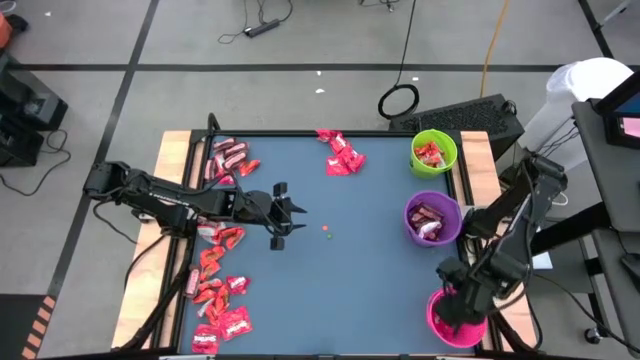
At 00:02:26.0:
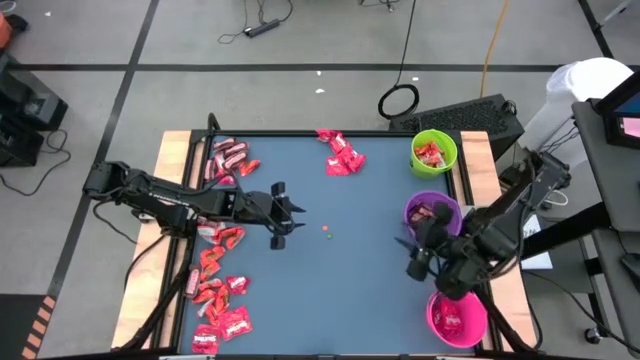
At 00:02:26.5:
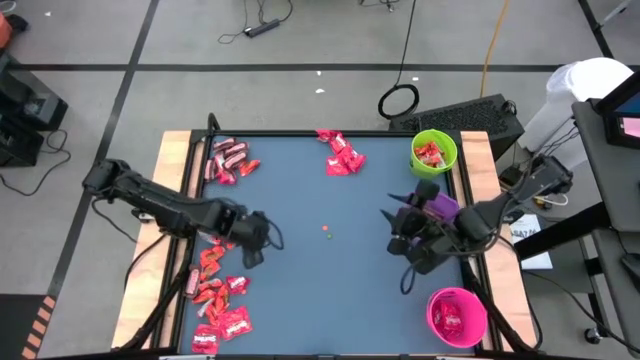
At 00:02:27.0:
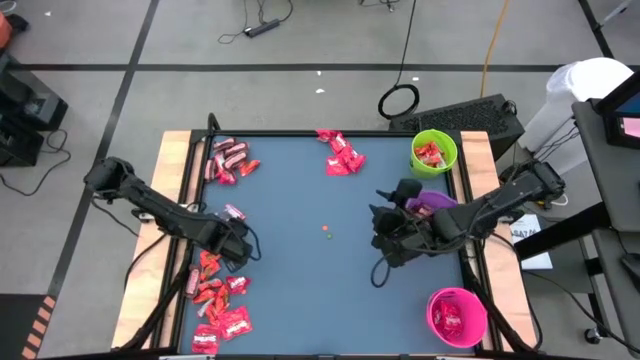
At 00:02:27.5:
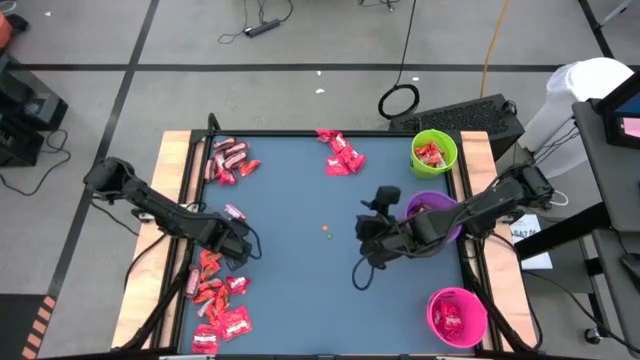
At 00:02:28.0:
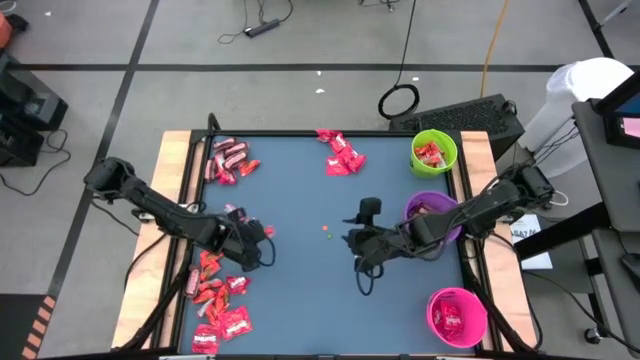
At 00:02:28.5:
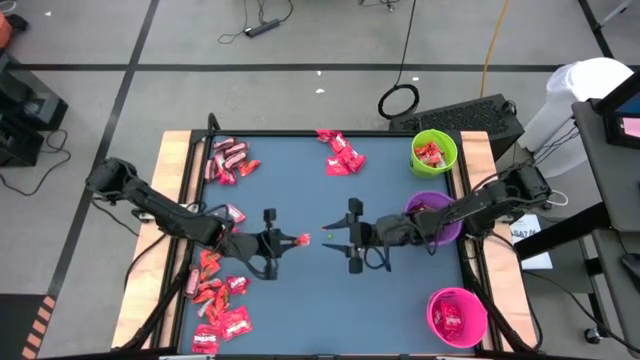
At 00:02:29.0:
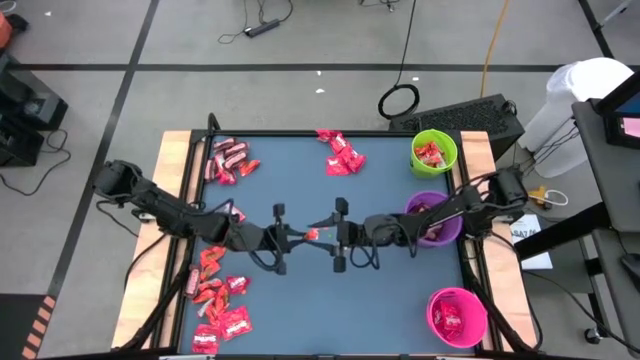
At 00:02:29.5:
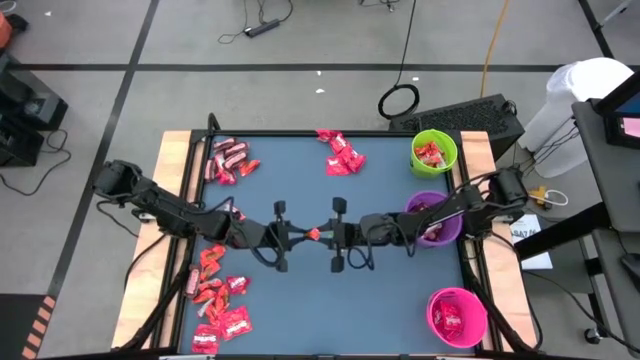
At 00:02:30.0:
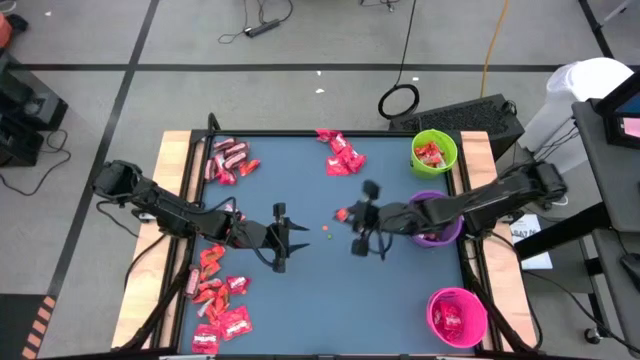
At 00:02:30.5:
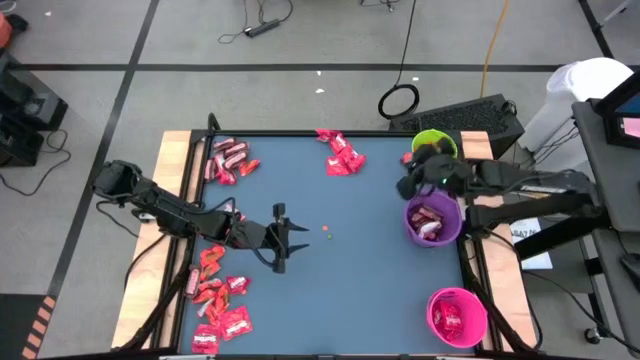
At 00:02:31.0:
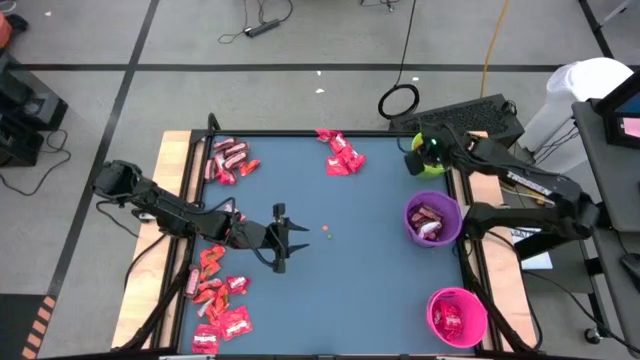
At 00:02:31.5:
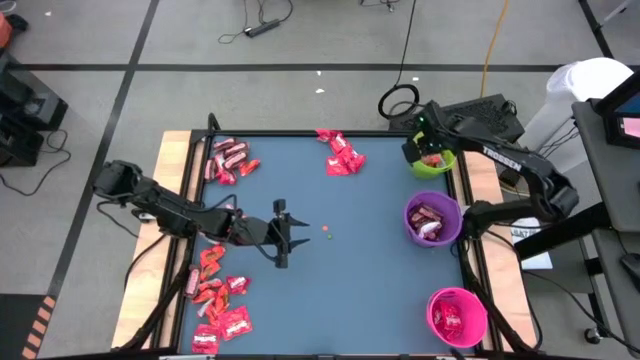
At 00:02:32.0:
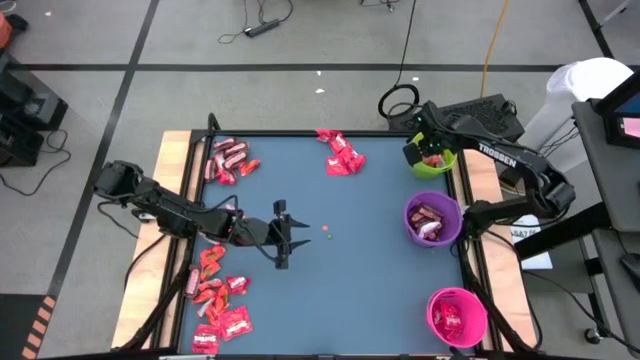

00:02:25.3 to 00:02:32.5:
Task: Organize candy in baskets
Put the orange chocolate bar into the green bucket

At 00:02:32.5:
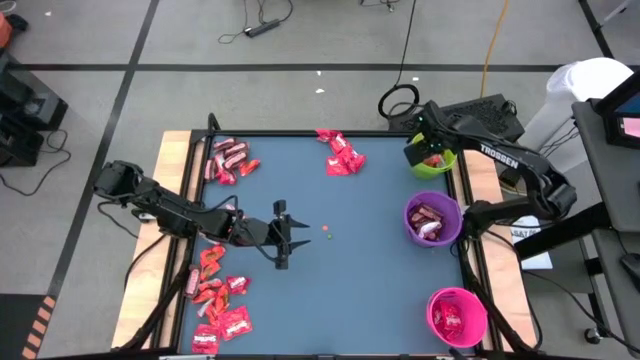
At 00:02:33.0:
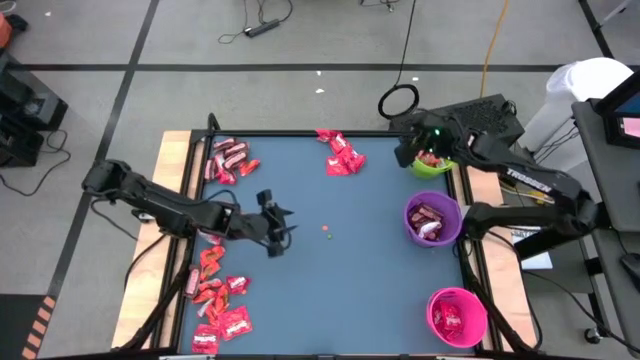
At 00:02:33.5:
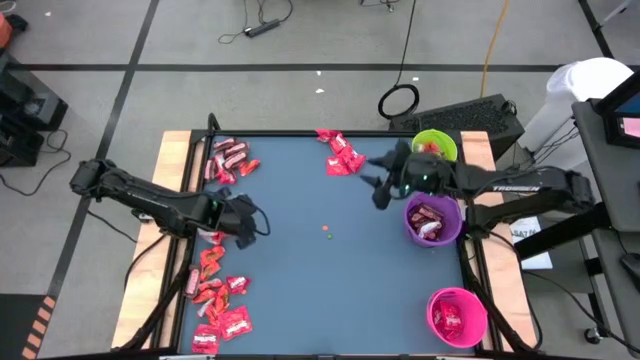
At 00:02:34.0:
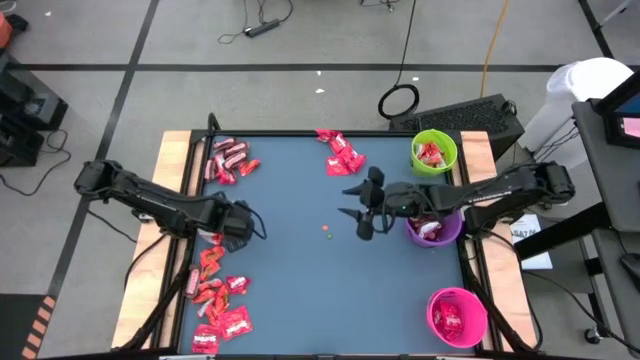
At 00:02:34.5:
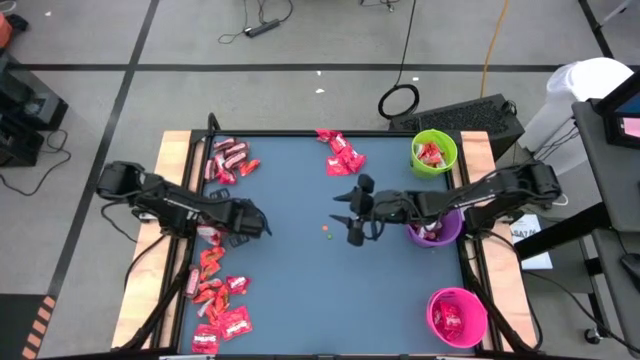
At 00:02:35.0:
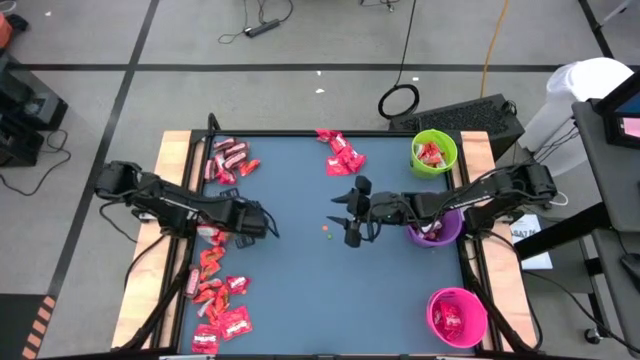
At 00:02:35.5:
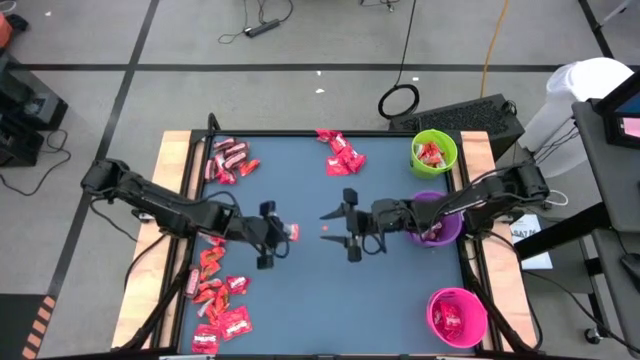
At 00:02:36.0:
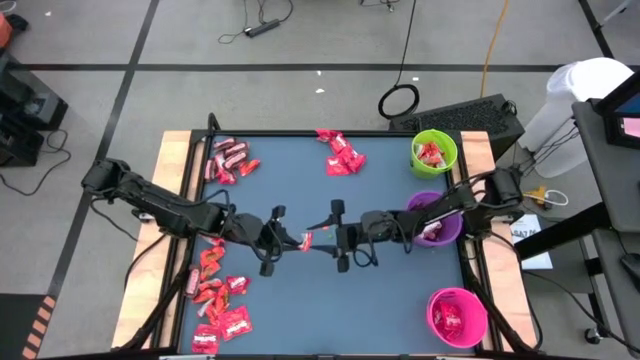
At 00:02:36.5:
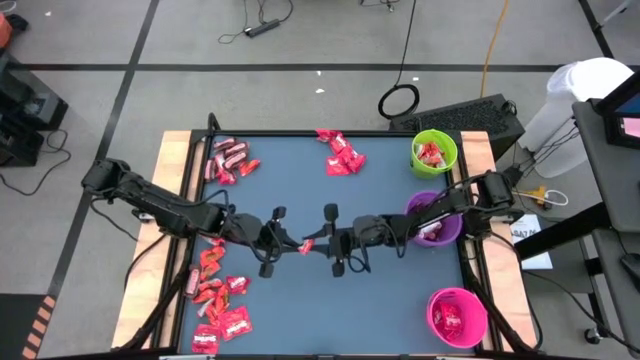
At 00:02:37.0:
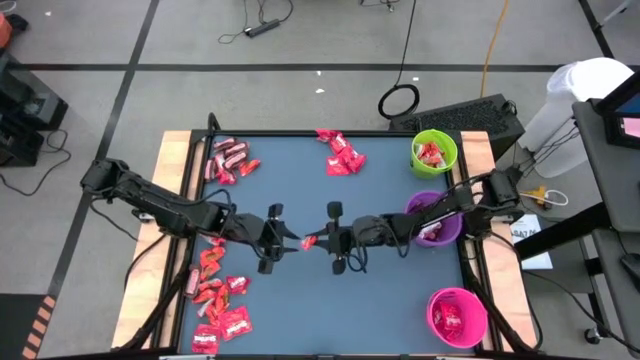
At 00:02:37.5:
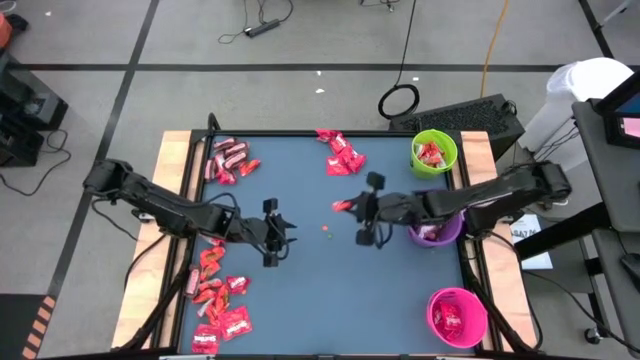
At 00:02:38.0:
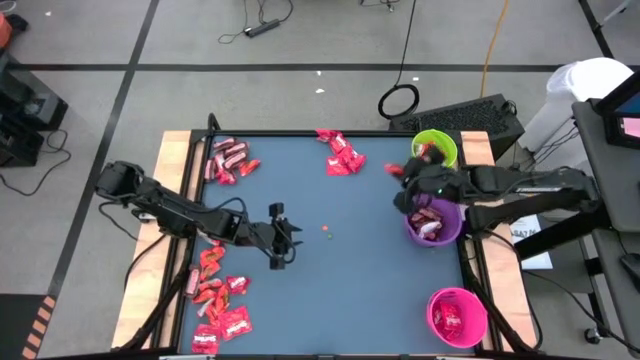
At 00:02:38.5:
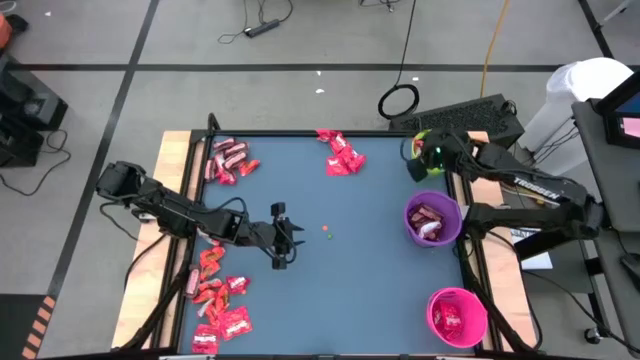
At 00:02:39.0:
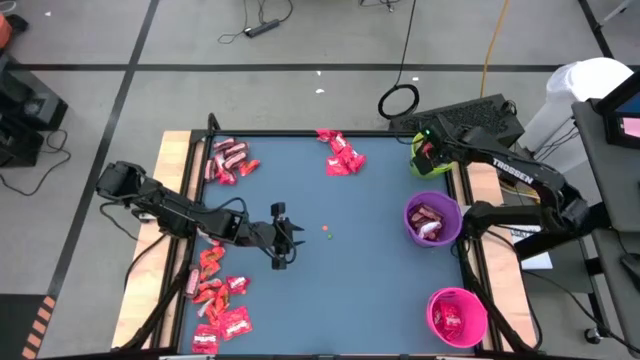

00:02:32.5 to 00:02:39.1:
Put the orange chocolate bar into the green bucket

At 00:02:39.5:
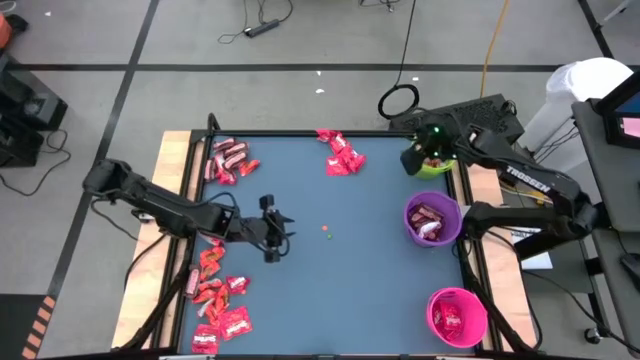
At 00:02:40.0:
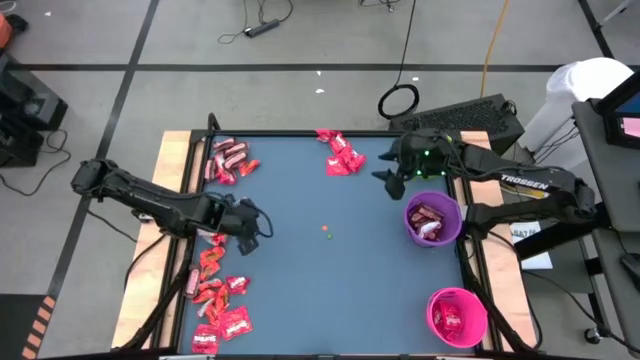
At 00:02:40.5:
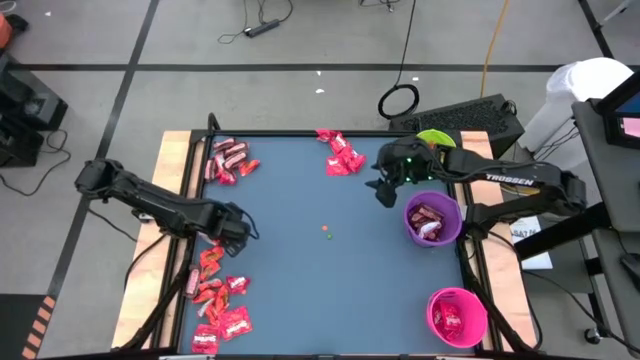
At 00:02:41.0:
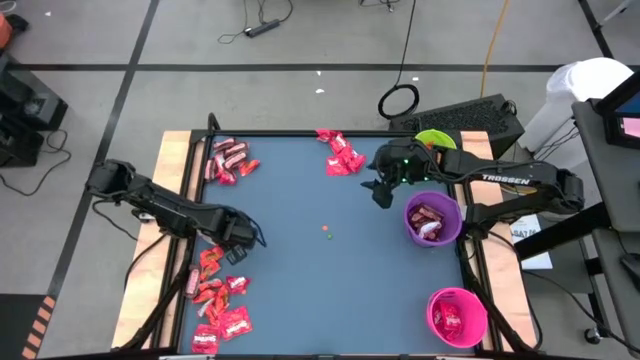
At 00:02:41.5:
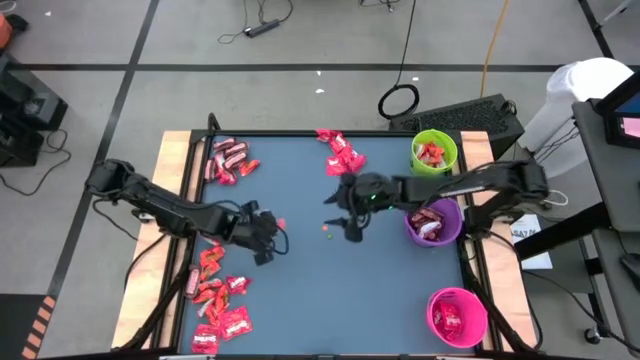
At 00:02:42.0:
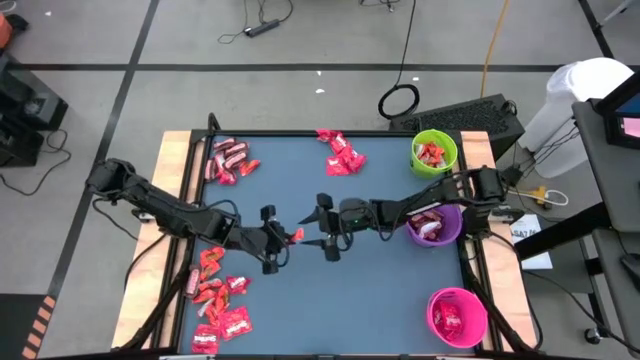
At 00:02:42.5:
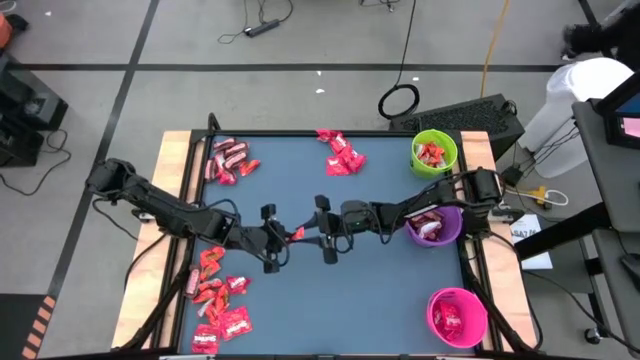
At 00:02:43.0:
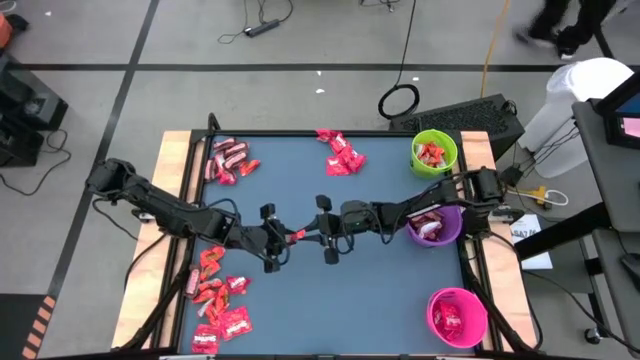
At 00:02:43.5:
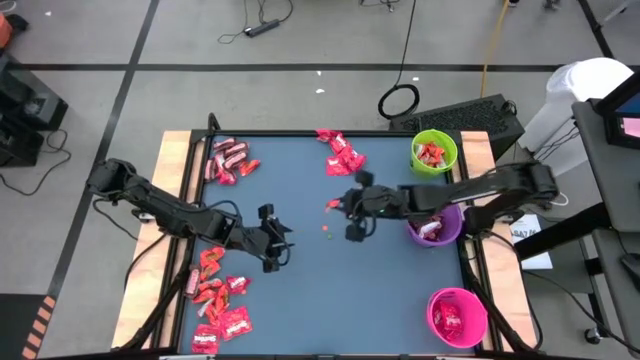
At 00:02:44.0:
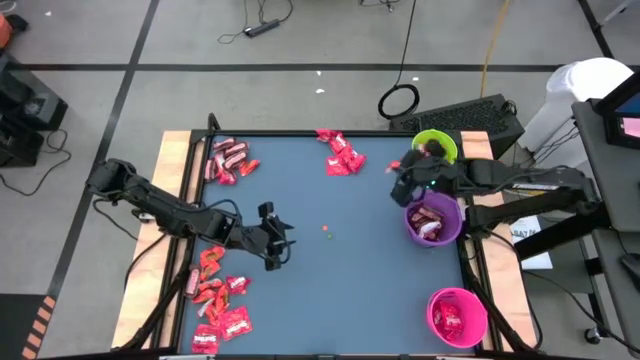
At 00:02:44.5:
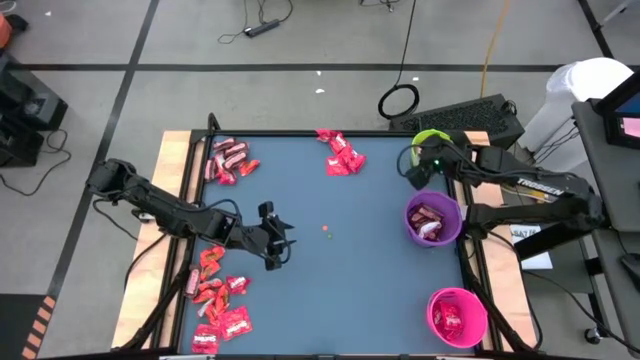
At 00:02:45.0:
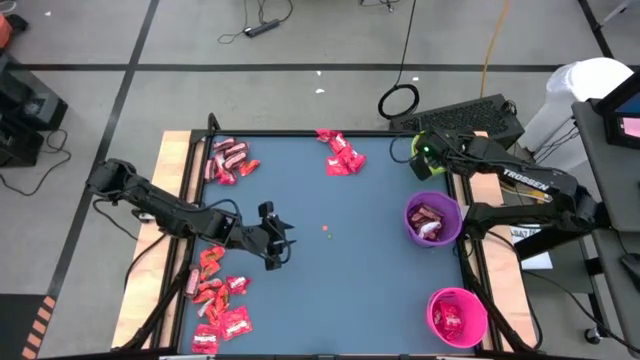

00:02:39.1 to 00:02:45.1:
Put the orange chocolate bar into the green bucket
